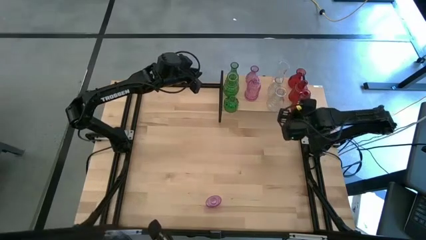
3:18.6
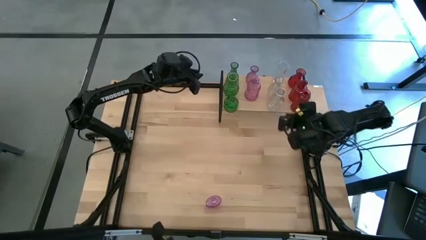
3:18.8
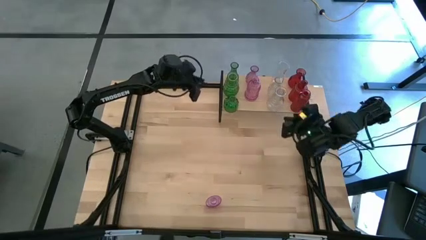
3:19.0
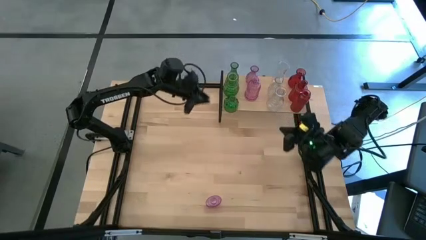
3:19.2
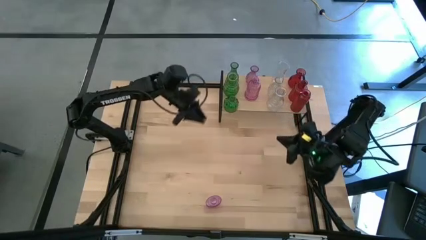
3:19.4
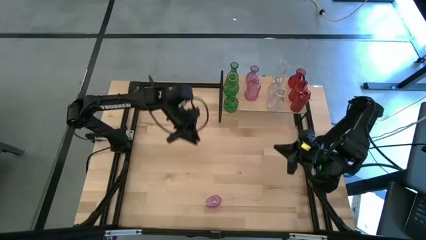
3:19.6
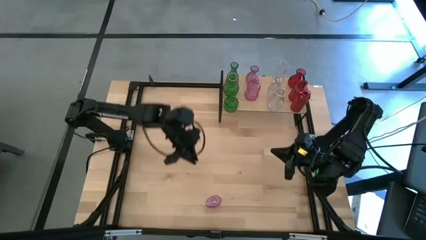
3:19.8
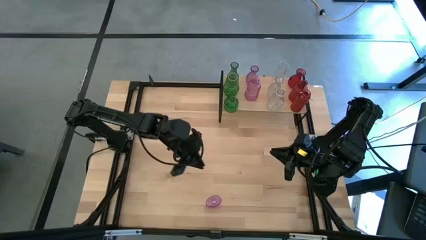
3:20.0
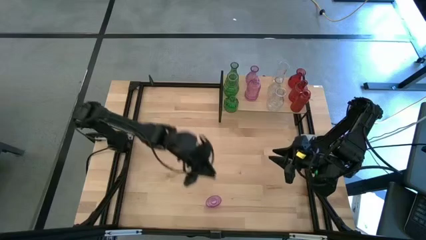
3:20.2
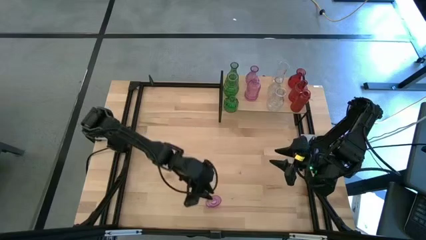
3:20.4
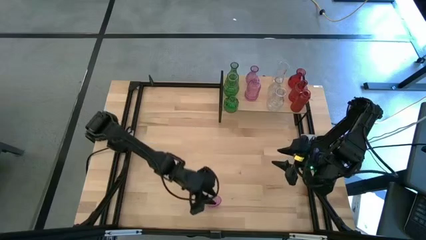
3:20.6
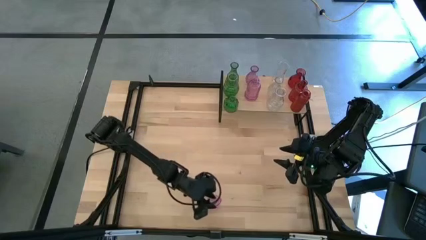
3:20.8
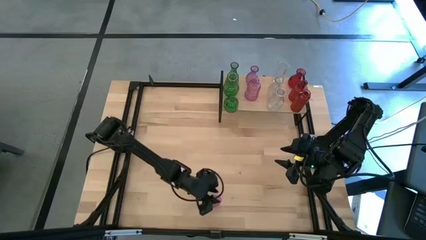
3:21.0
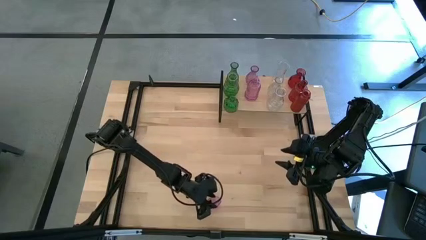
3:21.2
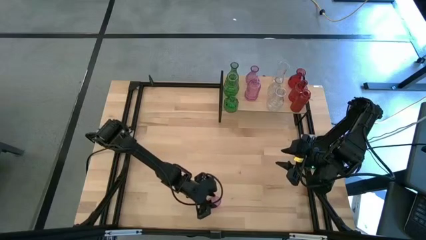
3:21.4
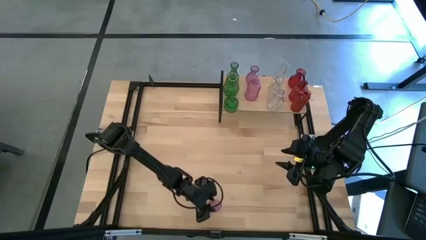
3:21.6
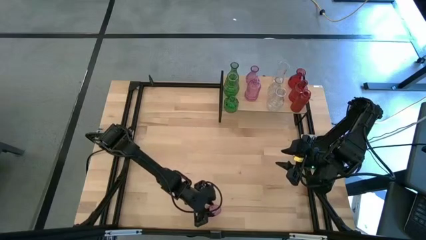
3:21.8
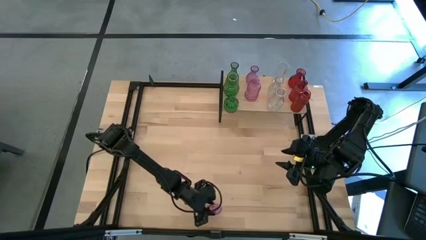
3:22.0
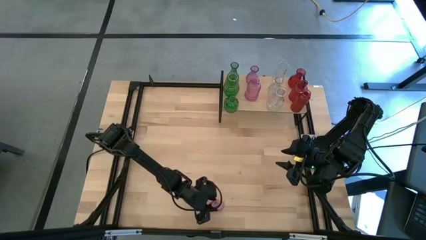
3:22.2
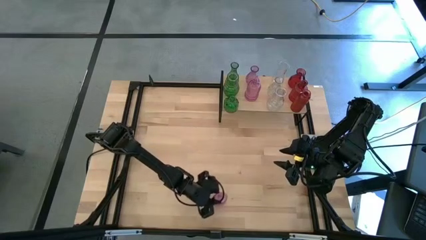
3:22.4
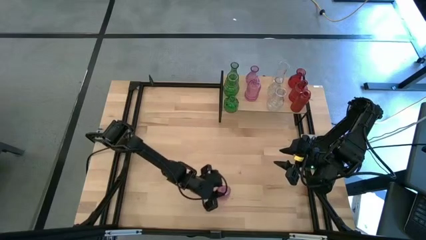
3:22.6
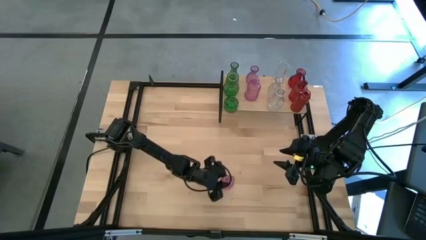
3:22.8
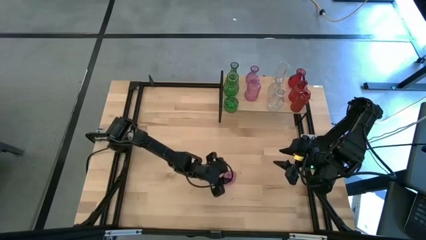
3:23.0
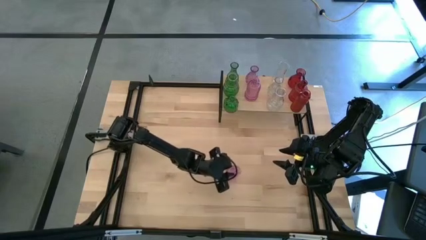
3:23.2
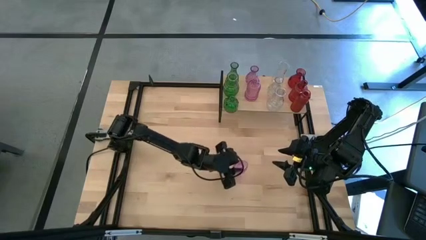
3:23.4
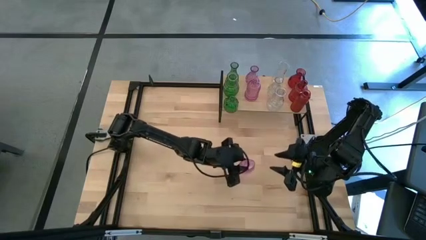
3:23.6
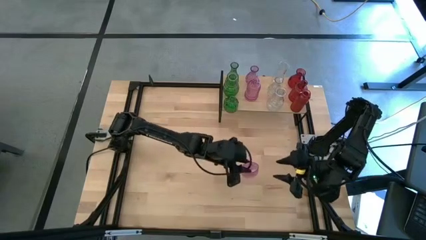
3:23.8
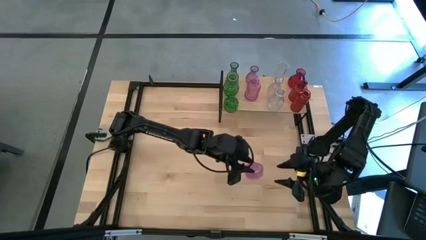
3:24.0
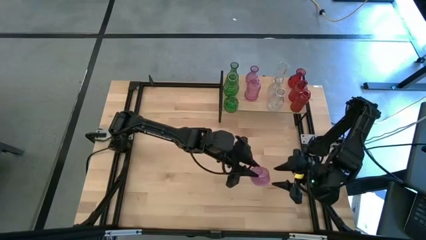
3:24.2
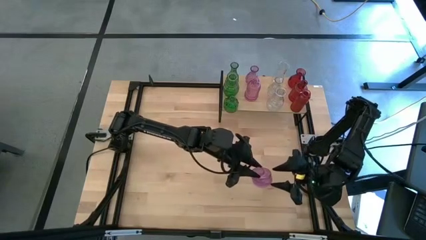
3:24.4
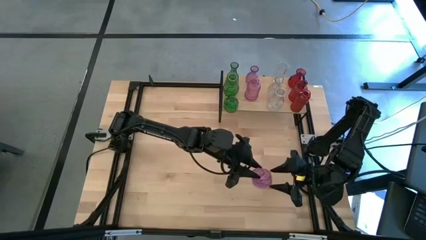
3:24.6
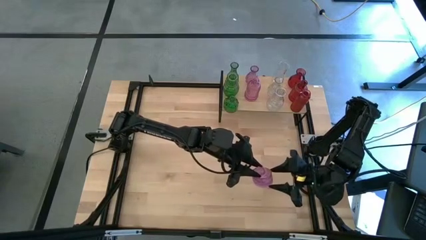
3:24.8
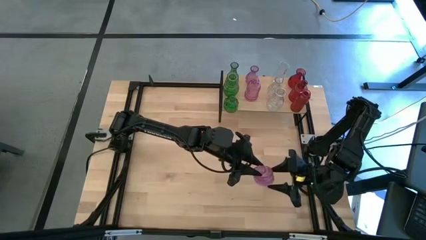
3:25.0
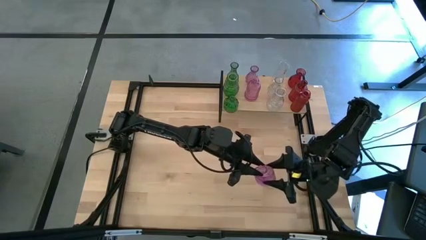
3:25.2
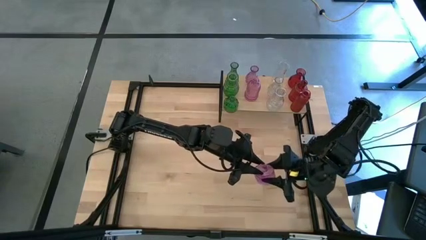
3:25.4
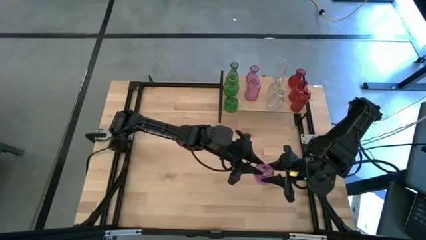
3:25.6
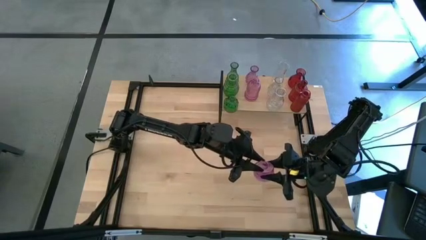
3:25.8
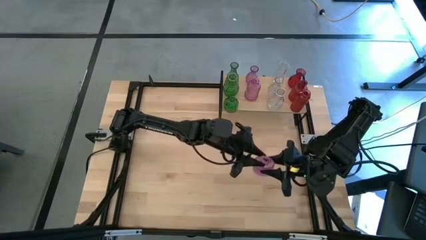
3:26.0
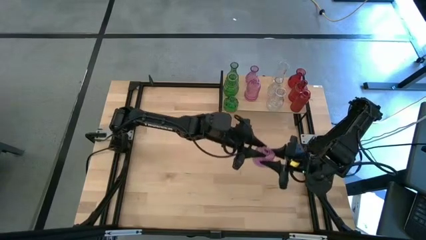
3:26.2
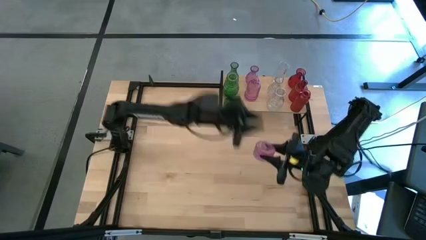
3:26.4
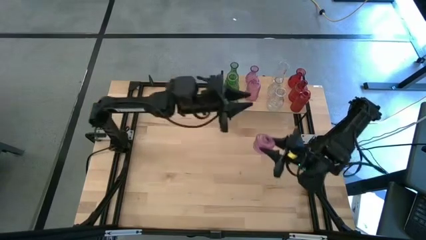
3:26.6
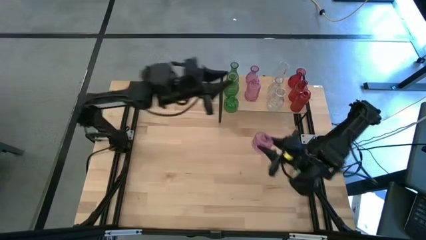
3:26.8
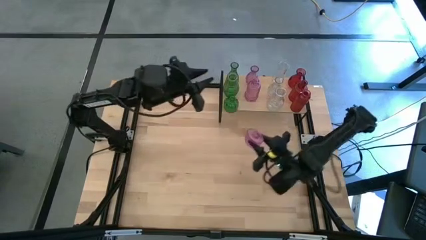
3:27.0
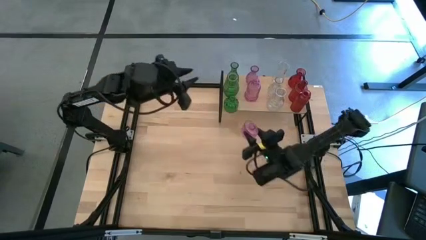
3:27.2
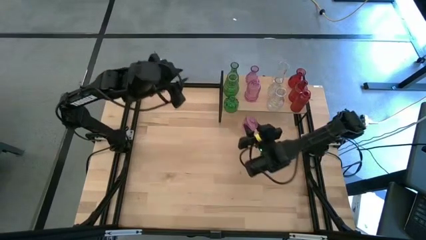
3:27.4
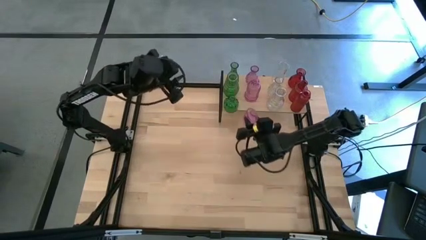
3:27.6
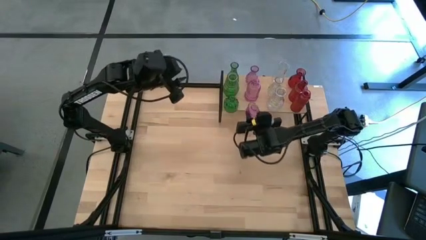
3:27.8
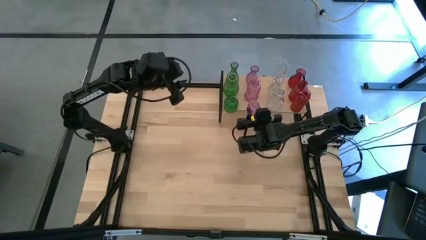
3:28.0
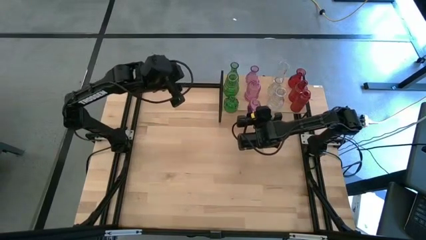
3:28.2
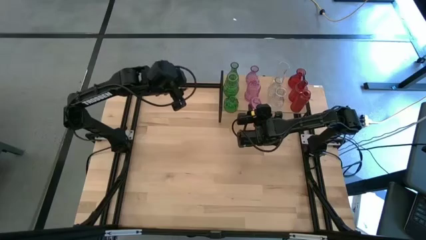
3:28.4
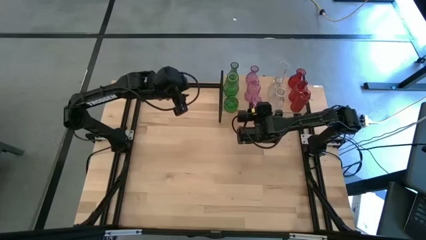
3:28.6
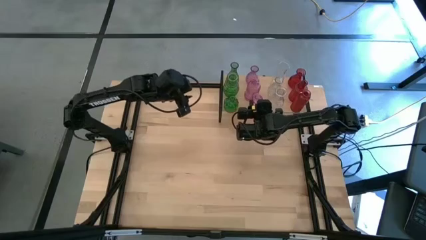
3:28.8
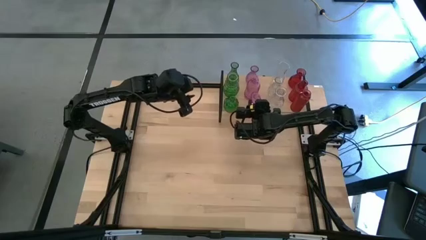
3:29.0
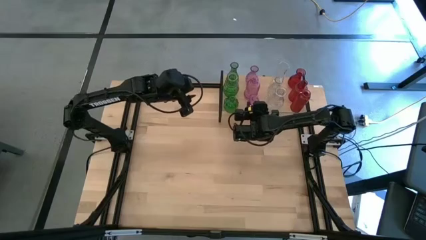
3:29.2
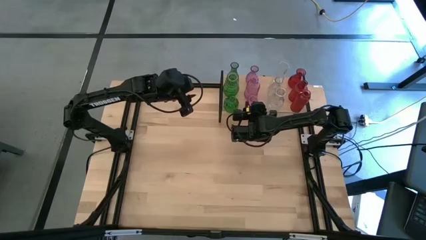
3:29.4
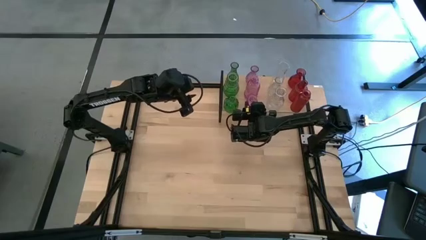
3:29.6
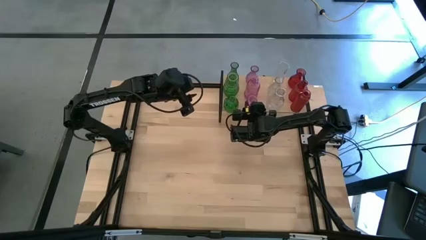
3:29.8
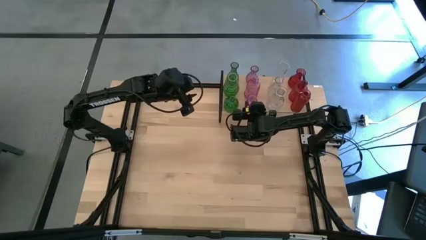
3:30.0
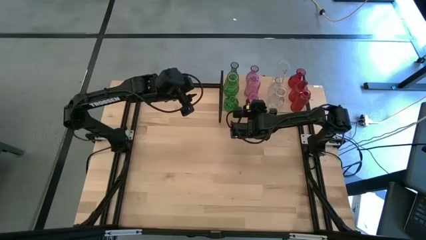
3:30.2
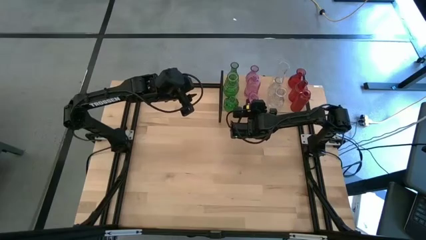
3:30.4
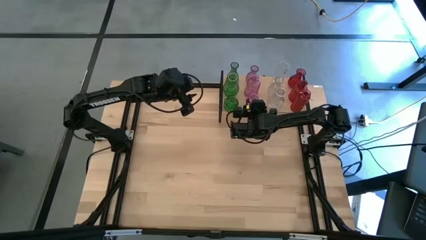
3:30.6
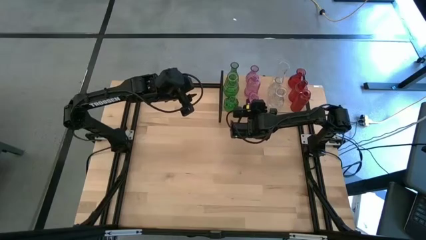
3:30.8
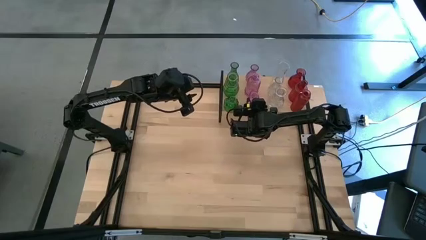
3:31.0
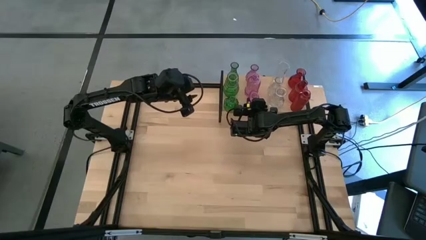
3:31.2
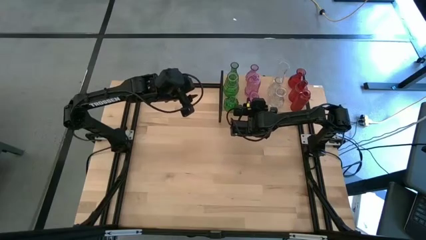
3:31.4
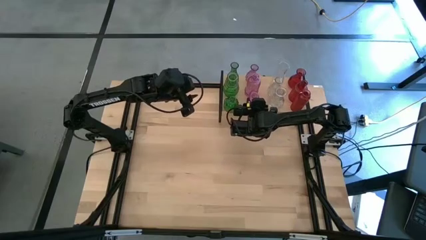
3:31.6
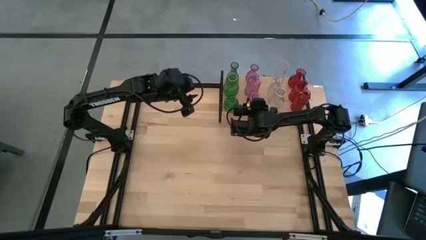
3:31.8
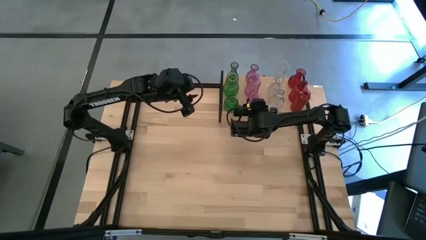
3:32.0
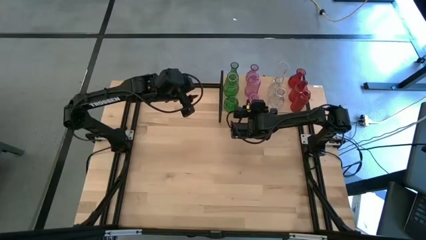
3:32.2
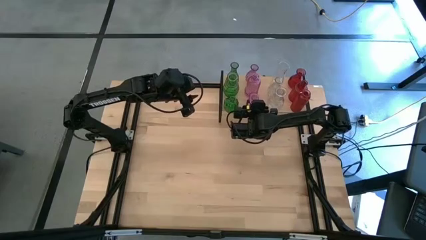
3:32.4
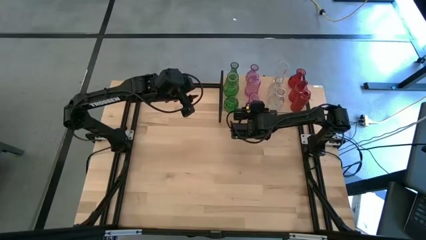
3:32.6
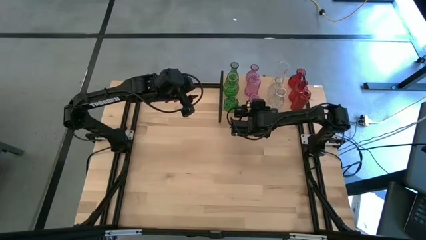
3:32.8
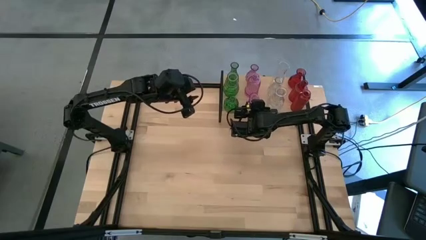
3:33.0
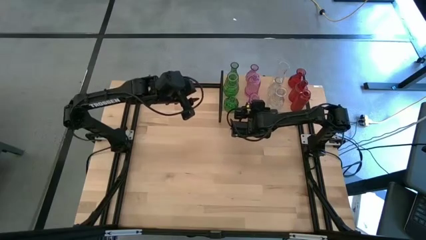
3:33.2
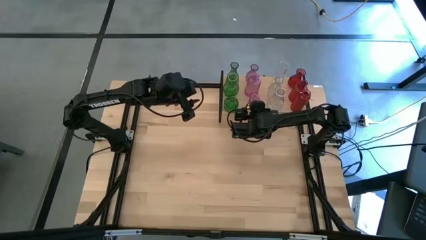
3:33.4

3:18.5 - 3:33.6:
Task: sort vases onto shelf
Put the pink vase on the shelf aligned with the other pink vases

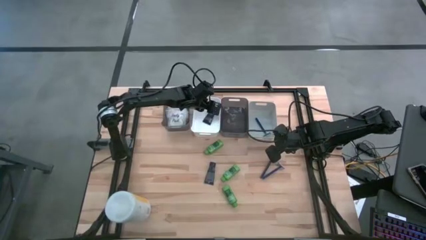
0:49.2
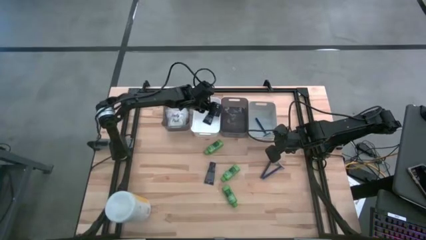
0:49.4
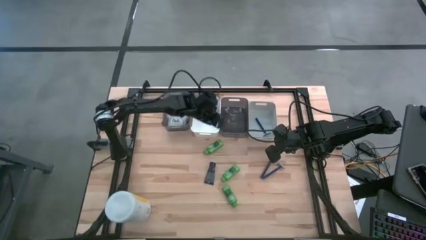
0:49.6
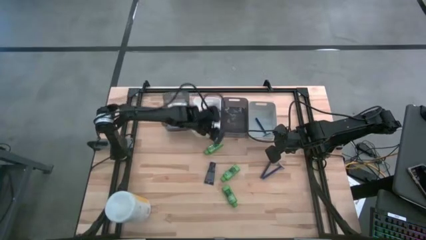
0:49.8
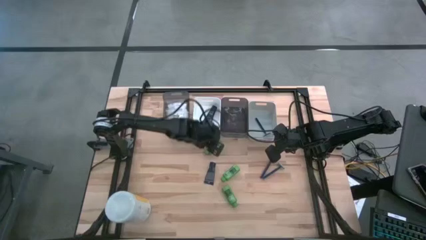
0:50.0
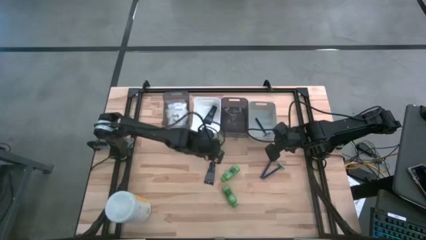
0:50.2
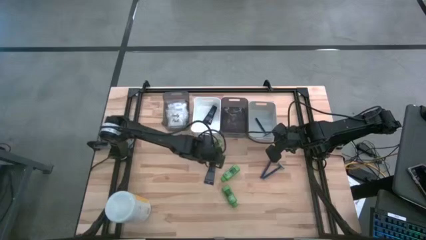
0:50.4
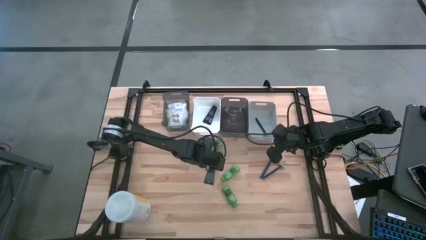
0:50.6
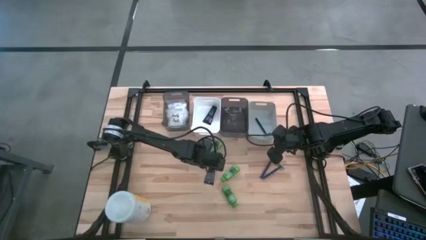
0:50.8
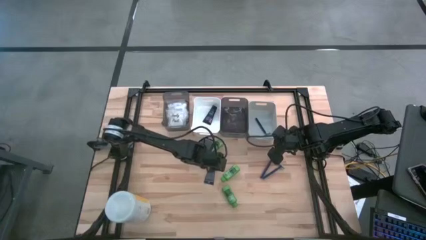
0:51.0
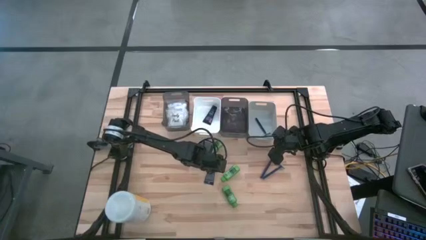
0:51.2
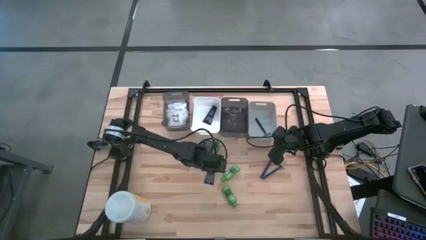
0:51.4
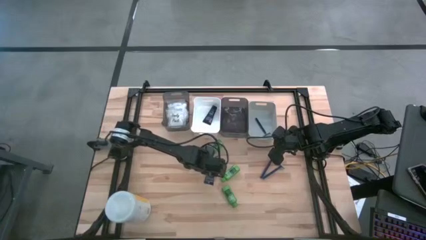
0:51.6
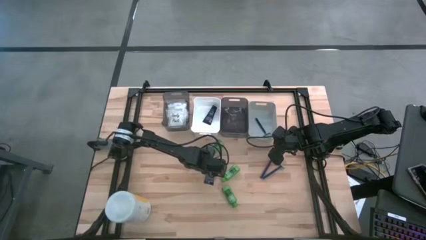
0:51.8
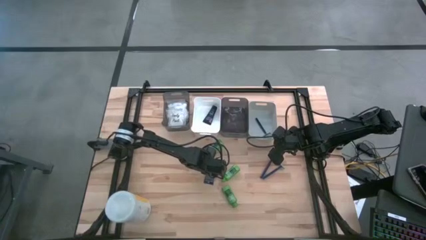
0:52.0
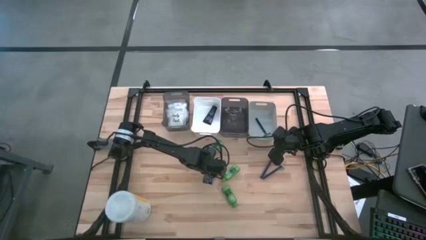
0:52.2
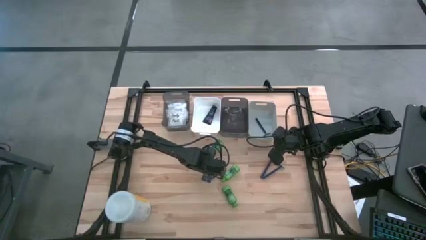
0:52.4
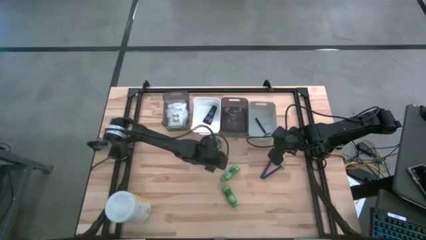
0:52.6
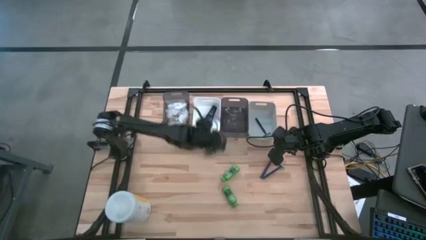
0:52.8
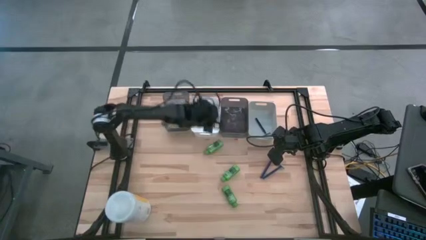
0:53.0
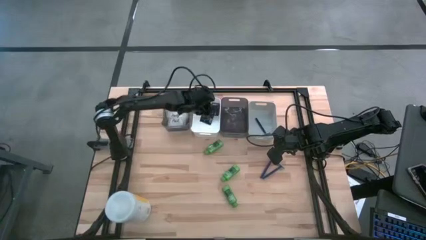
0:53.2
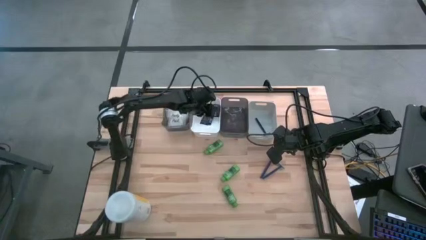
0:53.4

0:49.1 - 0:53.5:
Task: Pick & Place Travel size toiletries
Put the shave cream into the white bin
